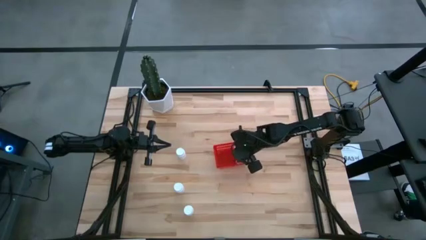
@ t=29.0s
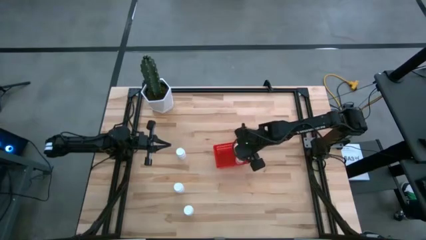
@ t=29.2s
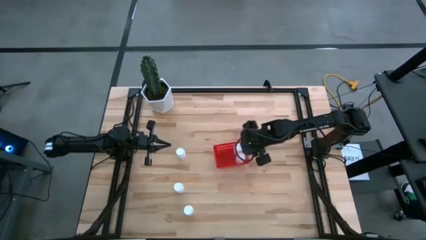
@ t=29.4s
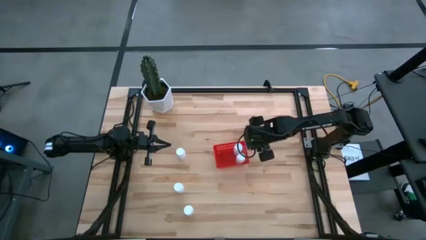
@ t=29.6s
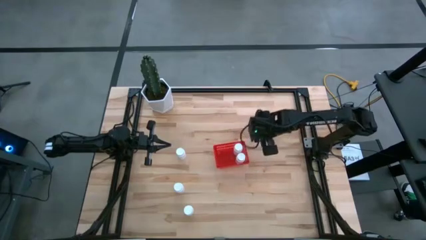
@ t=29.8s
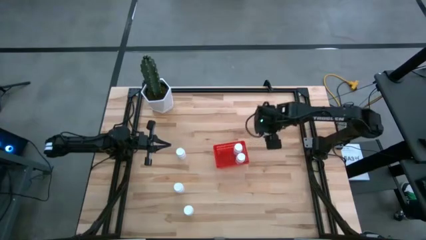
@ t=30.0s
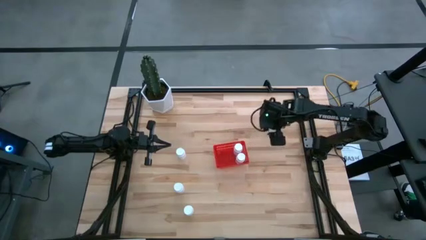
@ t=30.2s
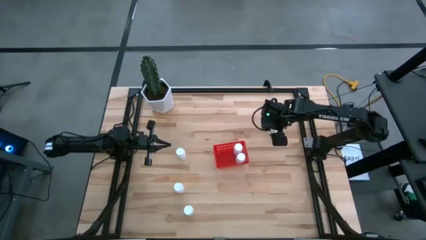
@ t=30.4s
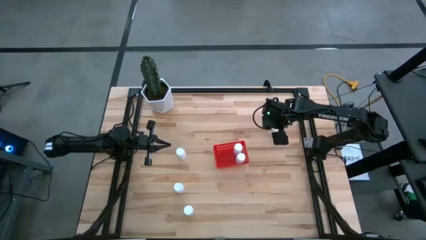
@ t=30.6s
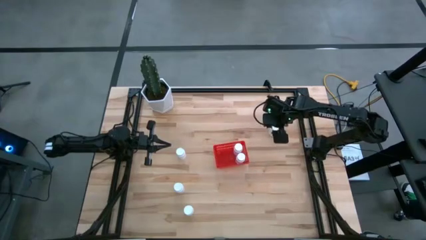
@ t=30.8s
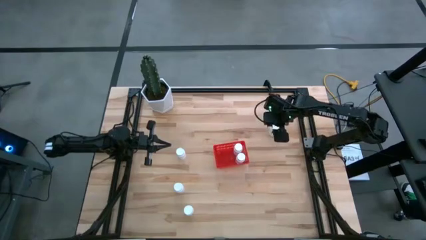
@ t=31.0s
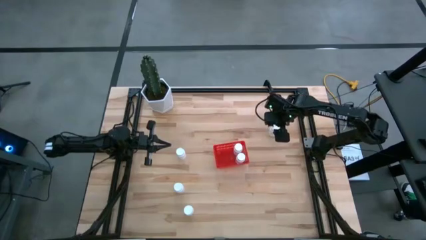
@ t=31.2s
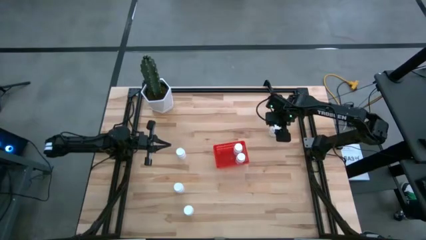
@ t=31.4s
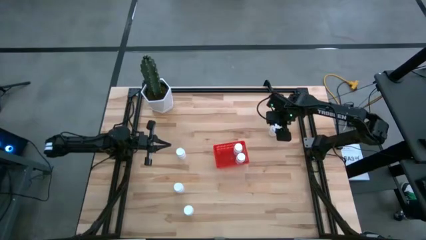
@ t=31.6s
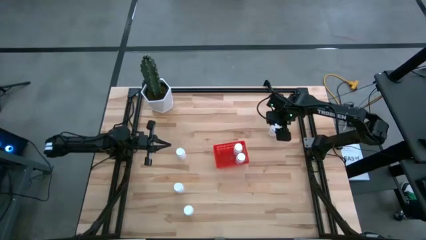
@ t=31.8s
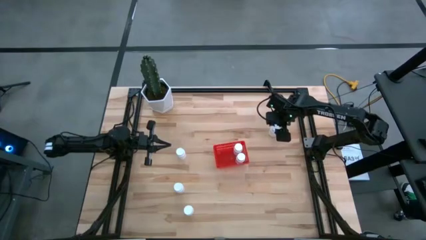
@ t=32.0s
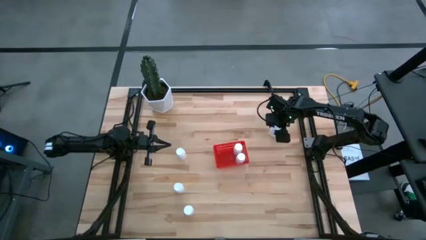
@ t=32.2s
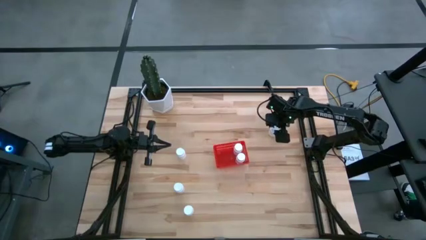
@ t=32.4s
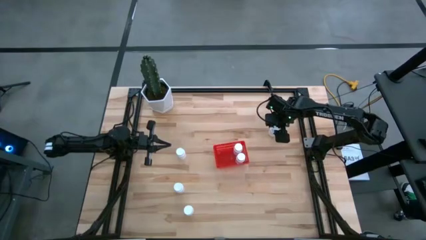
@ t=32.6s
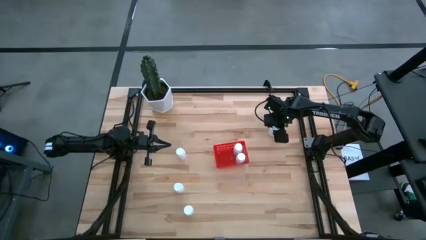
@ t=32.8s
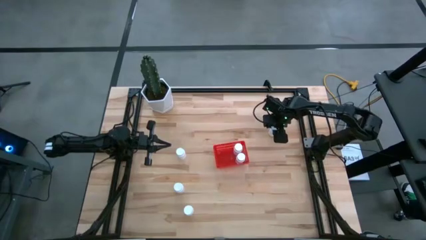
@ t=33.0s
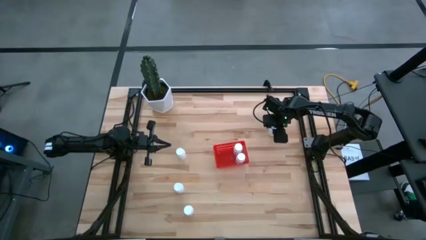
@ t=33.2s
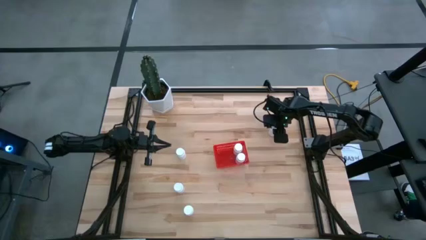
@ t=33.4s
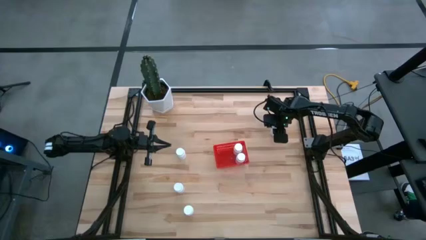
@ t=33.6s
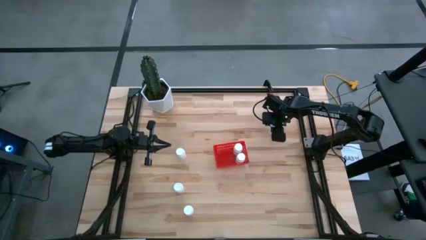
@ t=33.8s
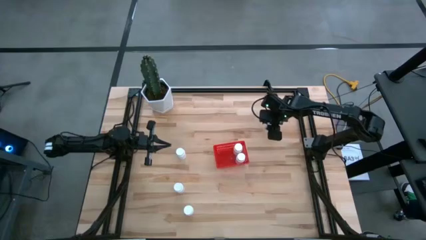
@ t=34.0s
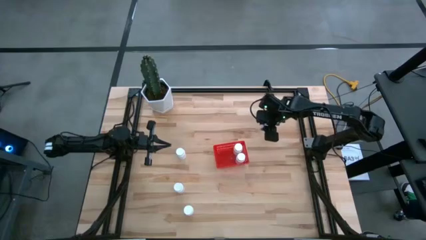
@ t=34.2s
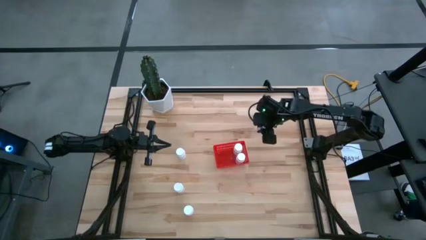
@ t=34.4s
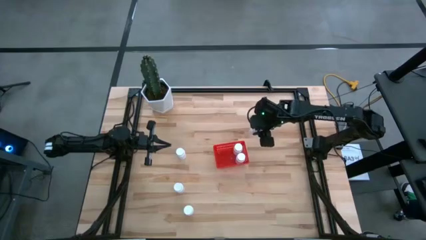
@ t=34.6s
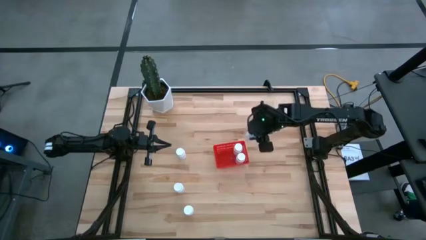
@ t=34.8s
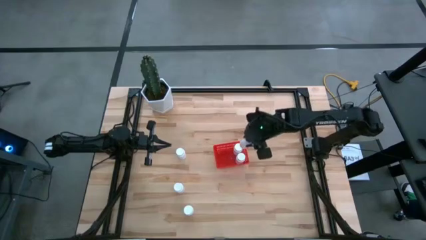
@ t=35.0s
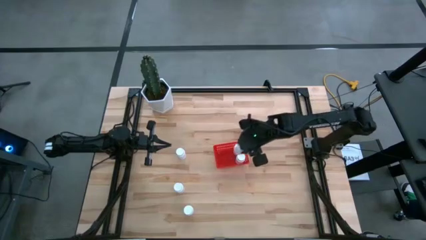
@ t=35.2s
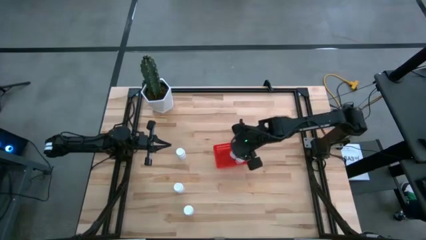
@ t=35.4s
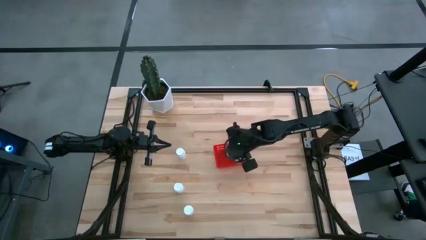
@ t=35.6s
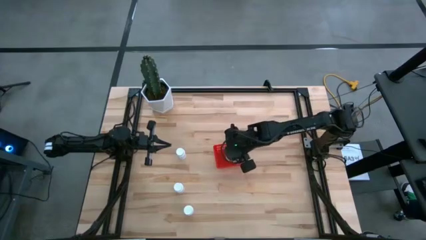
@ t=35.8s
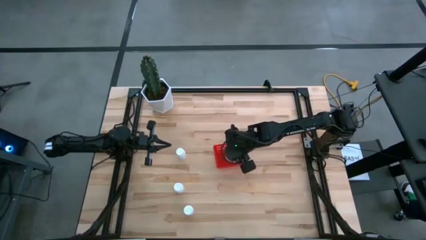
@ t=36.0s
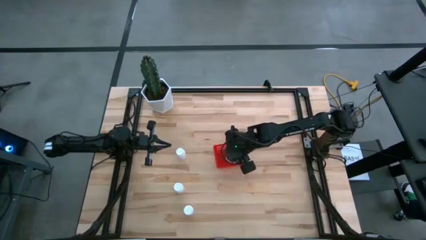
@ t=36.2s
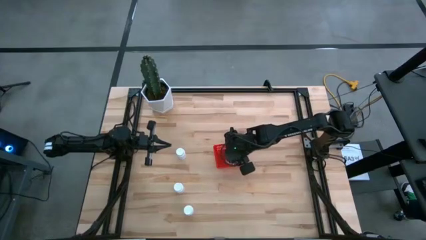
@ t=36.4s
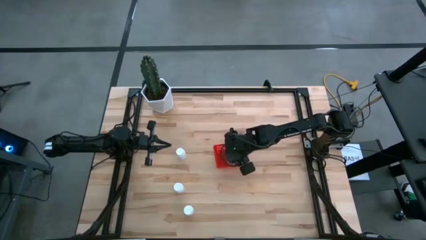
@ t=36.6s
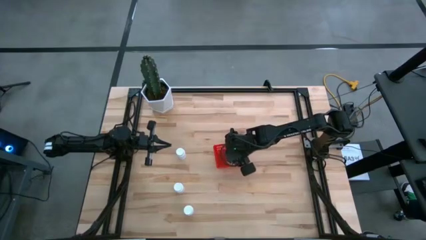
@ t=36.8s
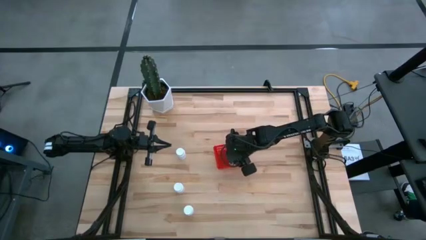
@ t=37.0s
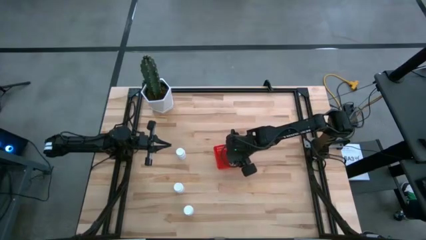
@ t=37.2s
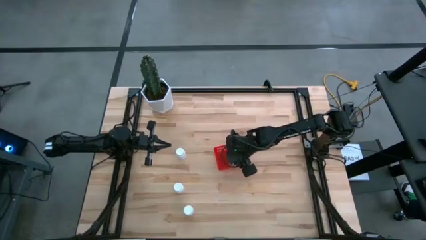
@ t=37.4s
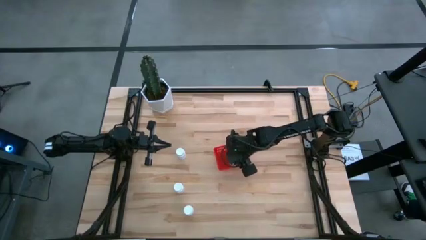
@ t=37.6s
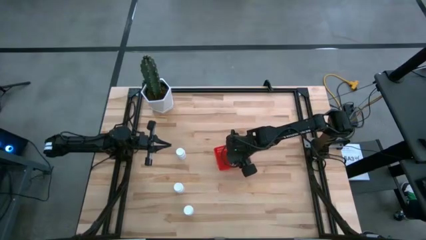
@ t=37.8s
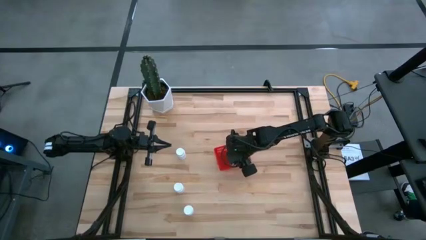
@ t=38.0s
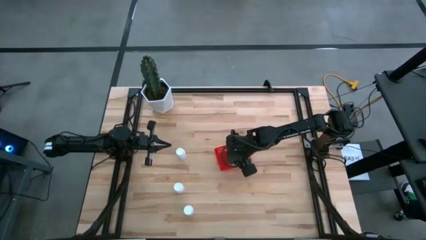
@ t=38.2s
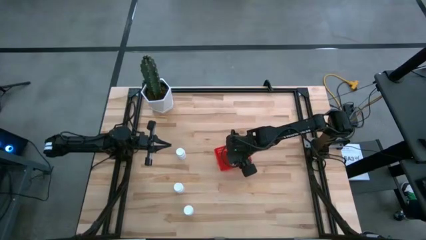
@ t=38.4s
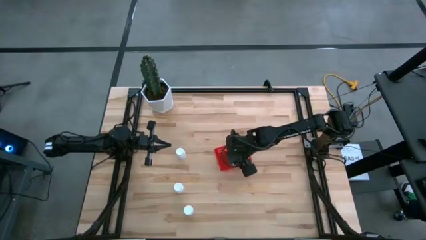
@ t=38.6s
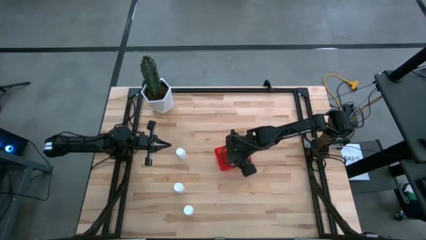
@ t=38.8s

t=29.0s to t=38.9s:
Task: Pick and place pill bottles into a basket
Put the white medicine bottle into the red basket

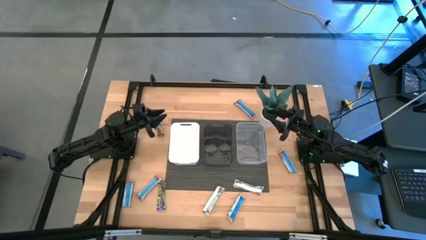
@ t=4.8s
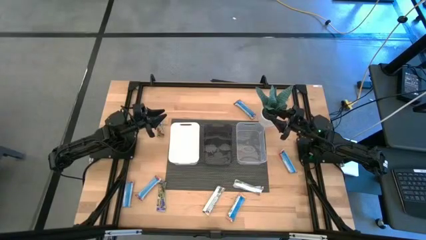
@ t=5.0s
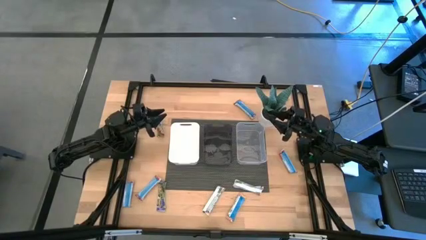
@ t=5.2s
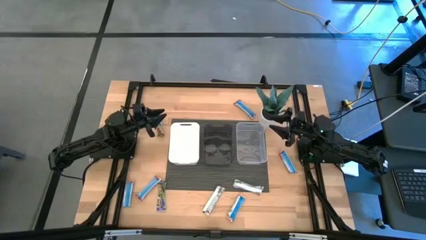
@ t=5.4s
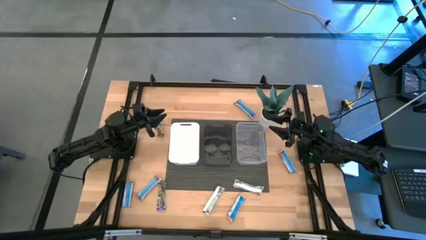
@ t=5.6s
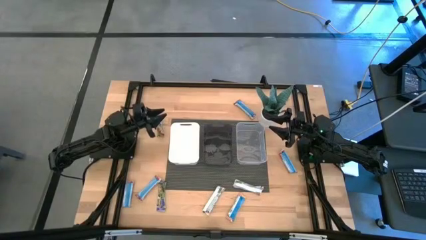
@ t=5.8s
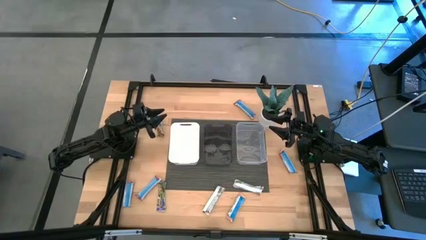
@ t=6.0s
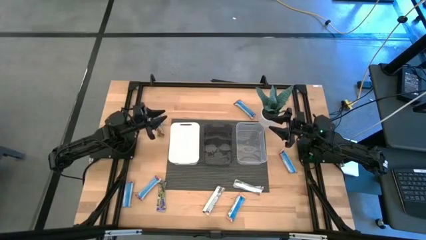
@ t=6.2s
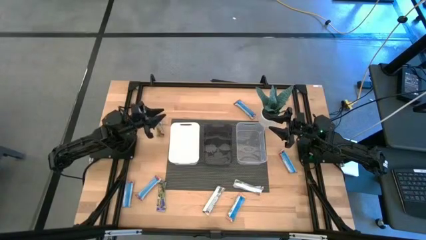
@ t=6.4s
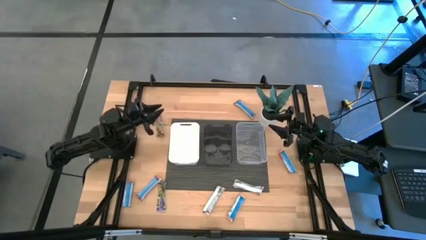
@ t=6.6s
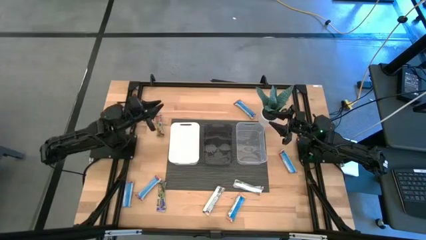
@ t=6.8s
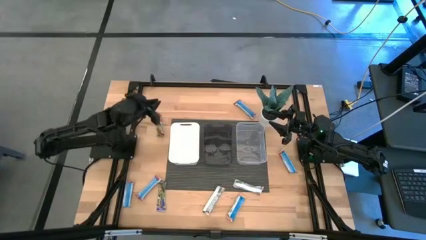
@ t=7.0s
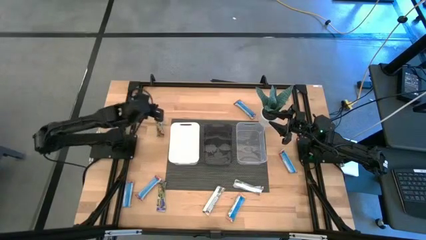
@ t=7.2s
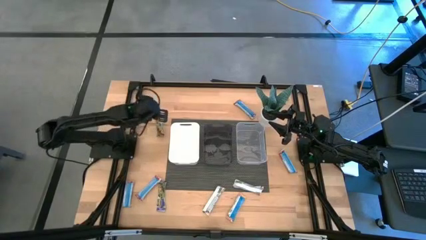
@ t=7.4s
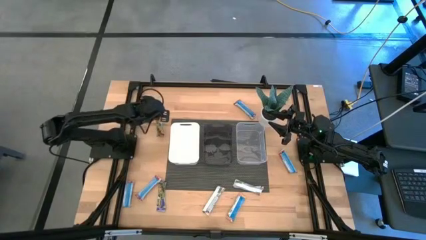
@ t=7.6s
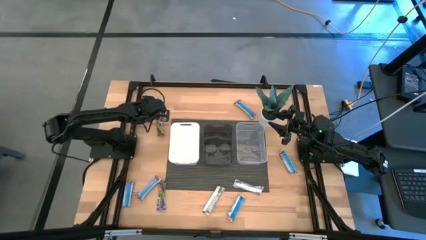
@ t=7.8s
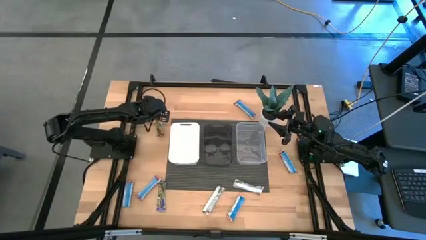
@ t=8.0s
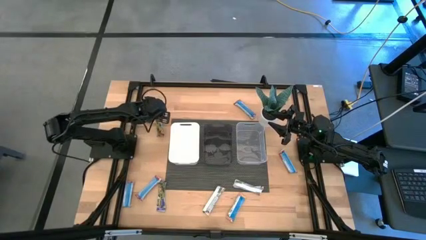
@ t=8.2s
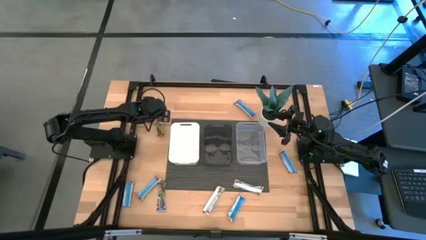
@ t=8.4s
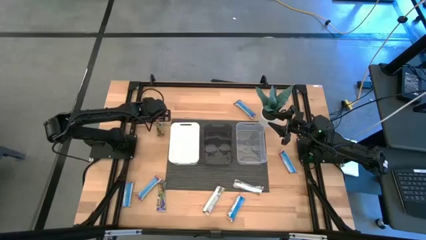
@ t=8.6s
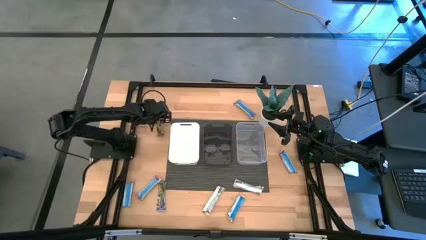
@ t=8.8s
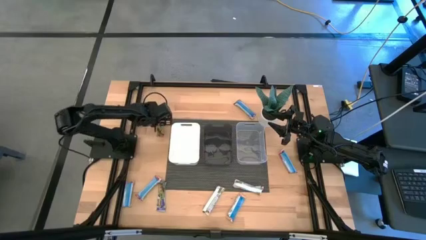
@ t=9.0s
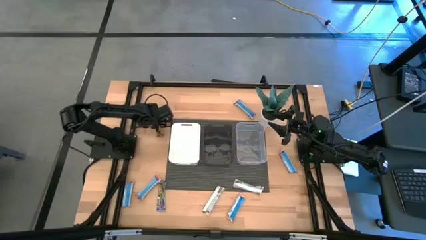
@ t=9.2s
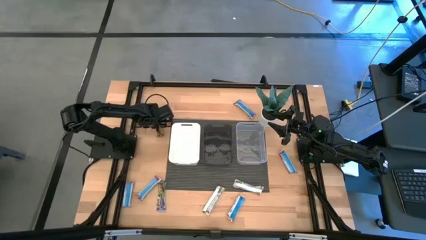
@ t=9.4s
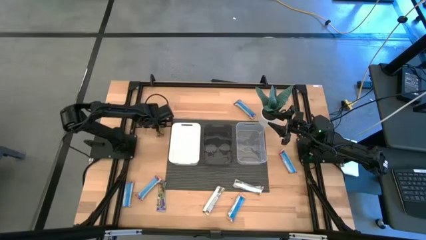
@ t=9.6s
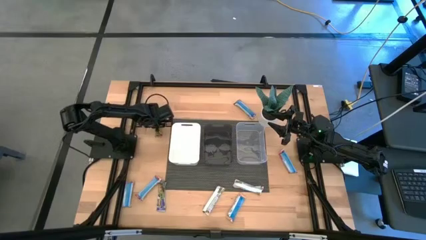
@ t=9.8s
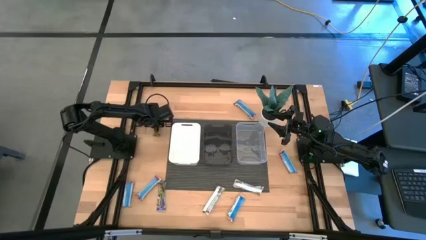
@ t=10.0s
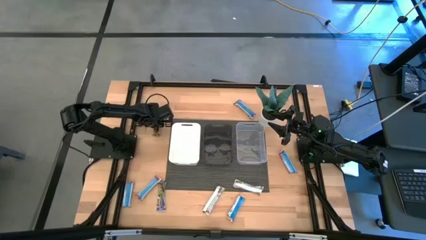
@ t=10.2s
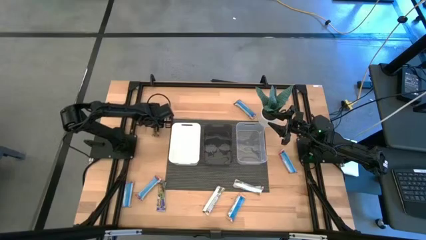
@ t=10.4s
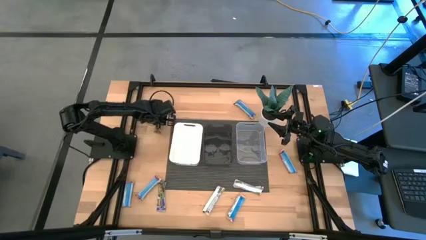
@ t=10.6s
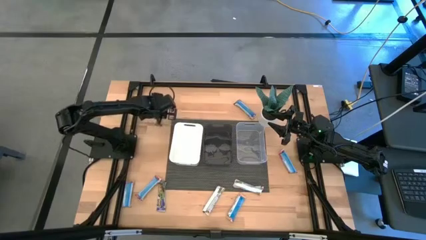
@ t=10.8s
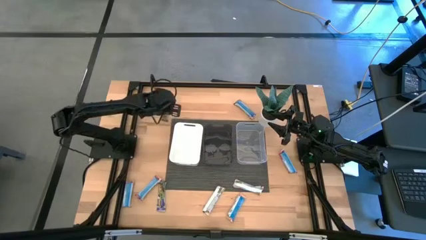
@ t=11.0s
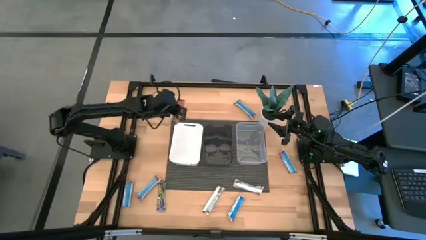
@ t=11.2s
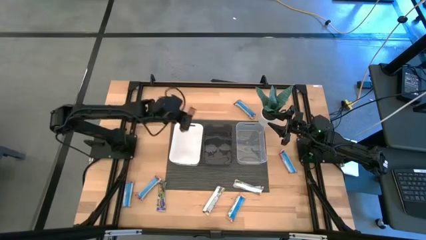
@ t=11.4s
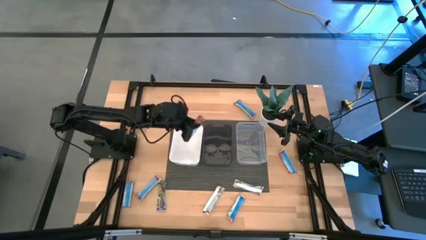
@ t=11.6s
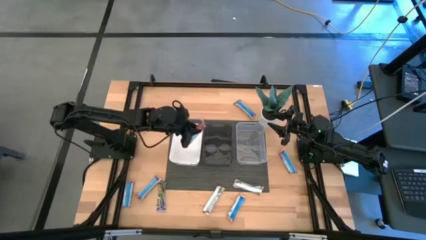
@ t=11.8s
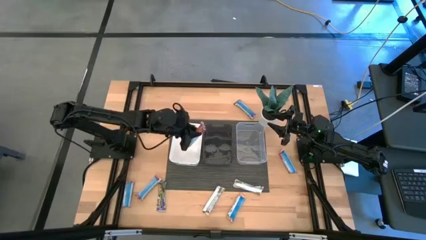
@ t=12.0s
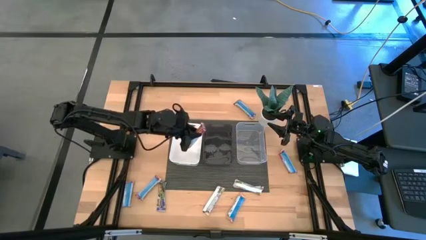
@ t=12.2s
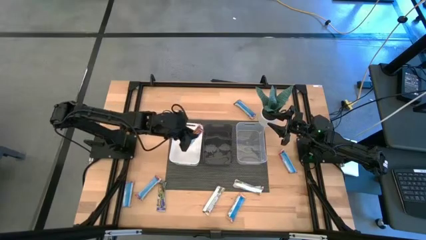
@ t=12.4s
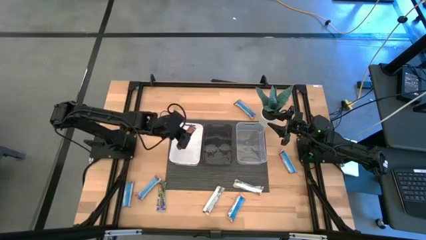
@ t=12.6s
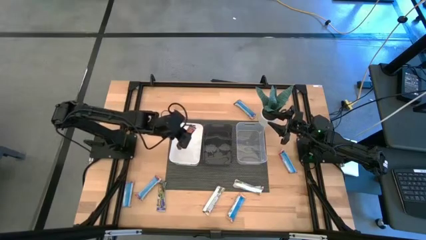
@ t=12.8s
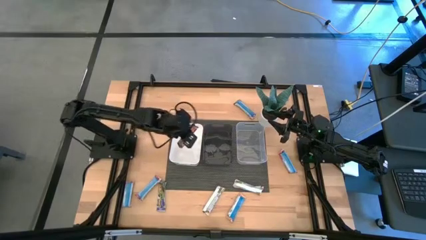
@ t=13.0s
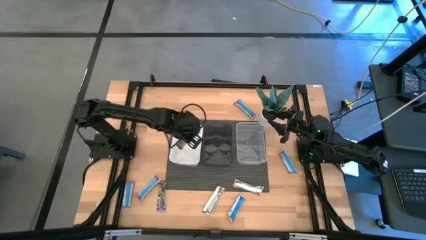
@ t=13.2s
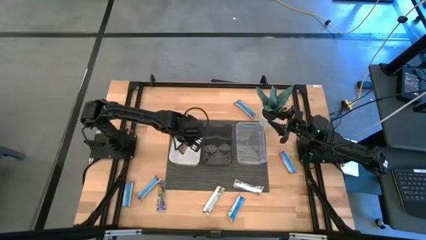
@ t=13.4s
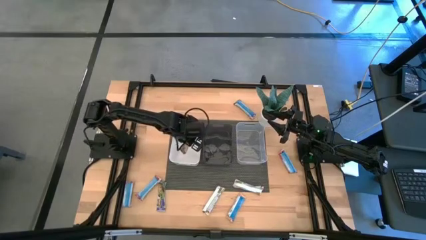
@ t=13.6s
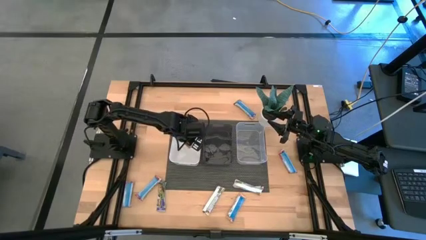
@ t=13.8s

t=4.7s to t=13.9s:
Task: Pick and place Granola Bars by type
Put the red granola bar into the white bin
